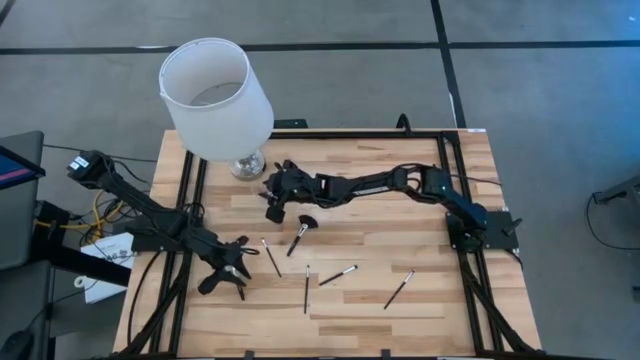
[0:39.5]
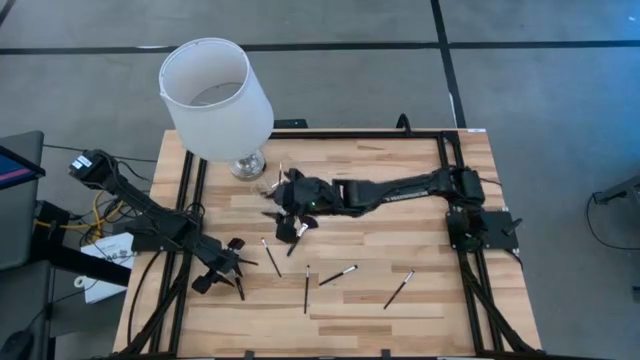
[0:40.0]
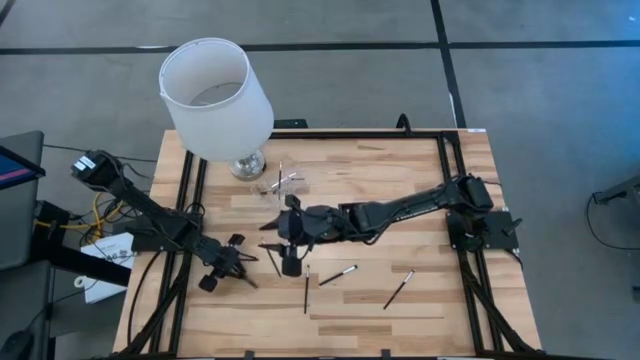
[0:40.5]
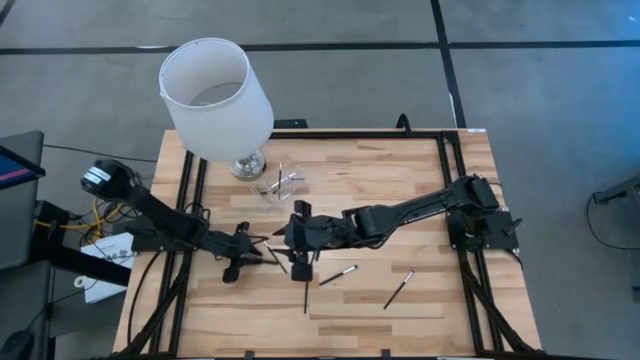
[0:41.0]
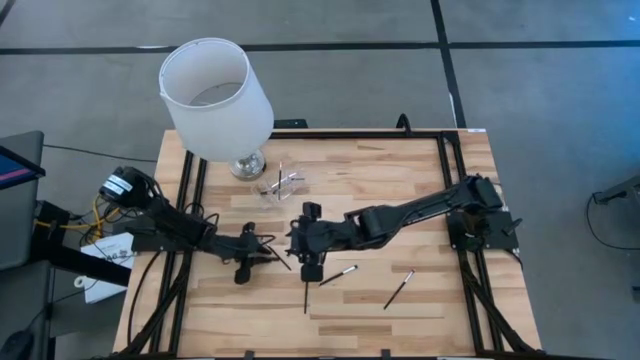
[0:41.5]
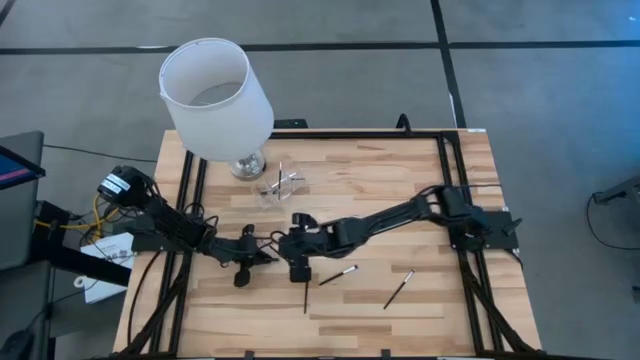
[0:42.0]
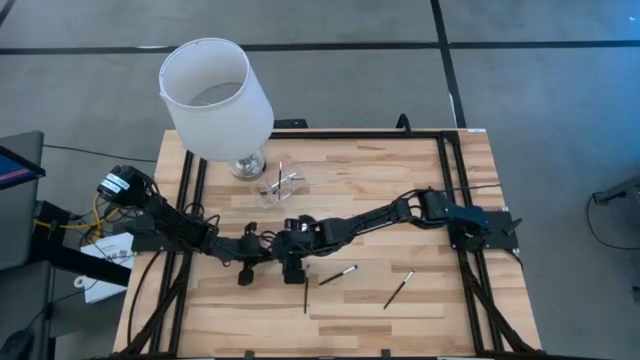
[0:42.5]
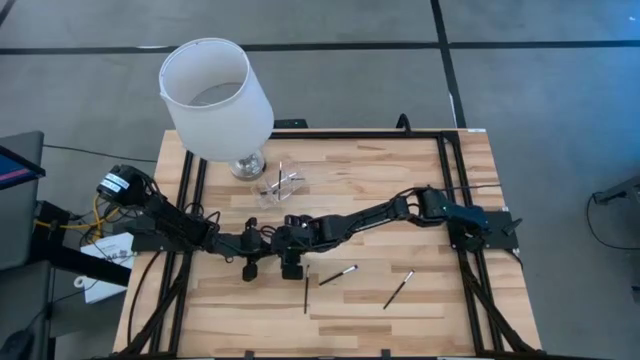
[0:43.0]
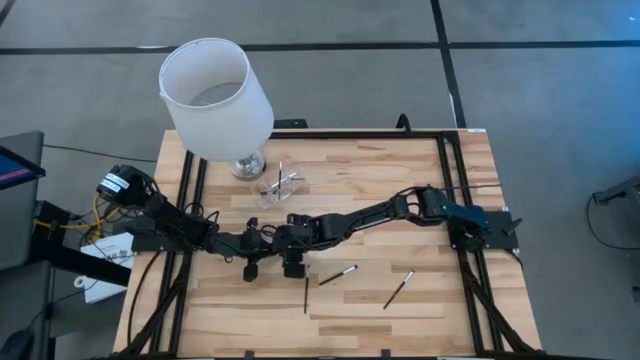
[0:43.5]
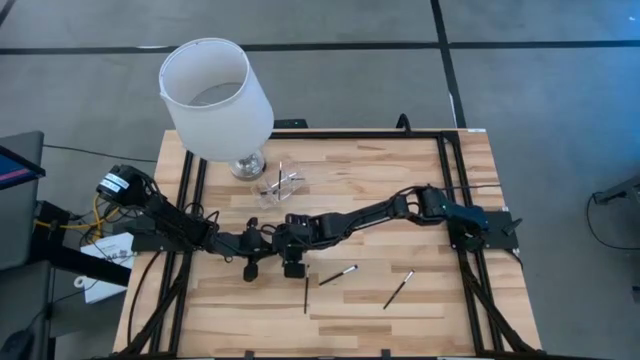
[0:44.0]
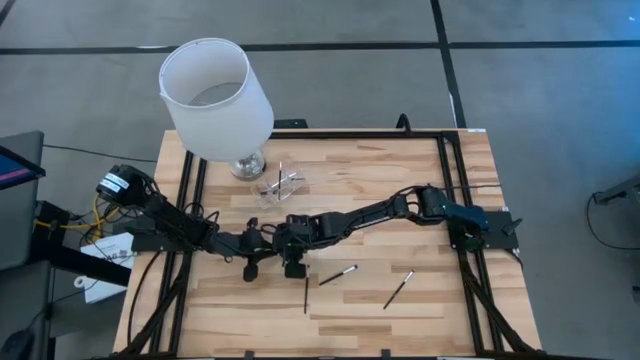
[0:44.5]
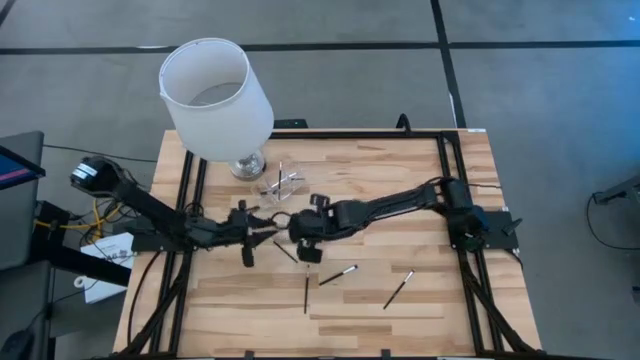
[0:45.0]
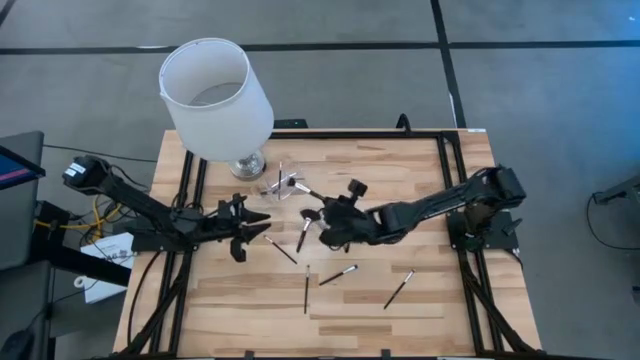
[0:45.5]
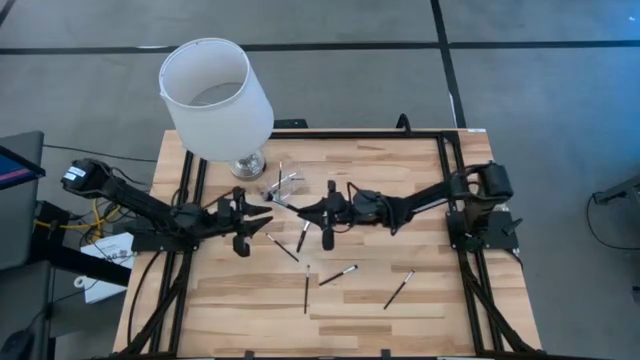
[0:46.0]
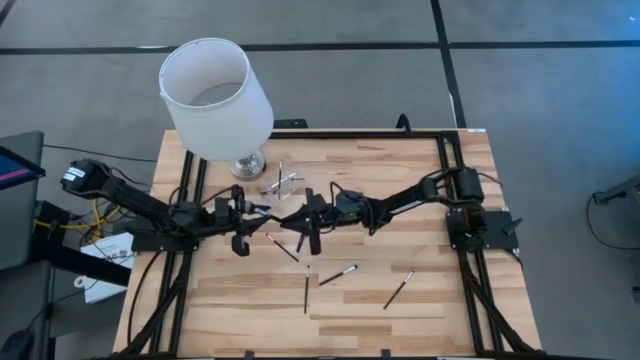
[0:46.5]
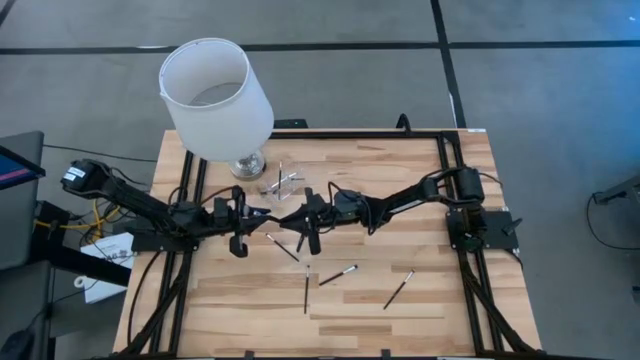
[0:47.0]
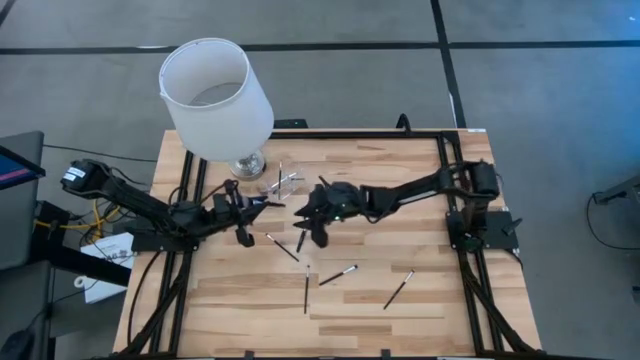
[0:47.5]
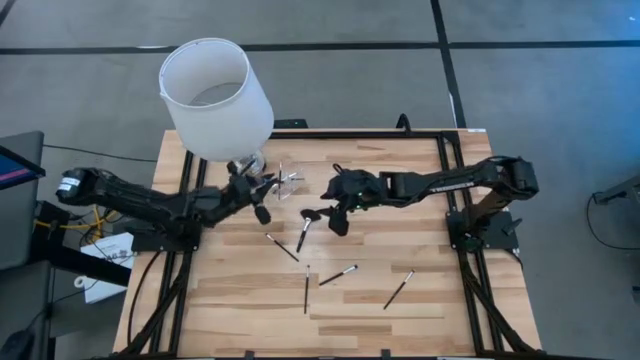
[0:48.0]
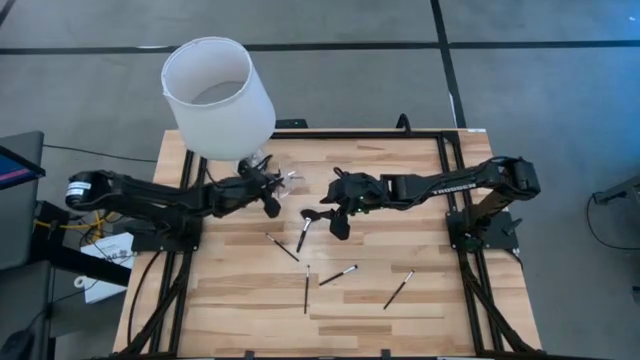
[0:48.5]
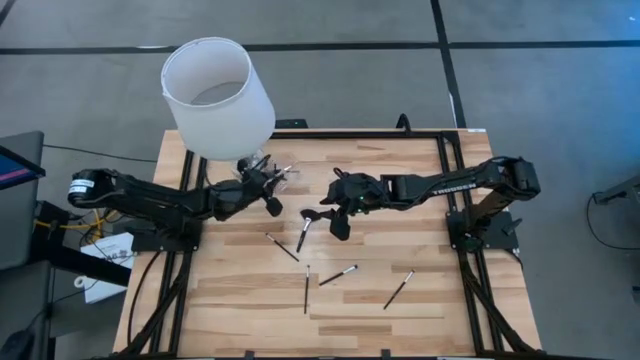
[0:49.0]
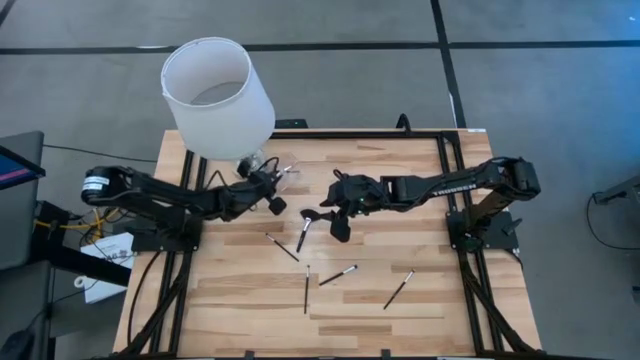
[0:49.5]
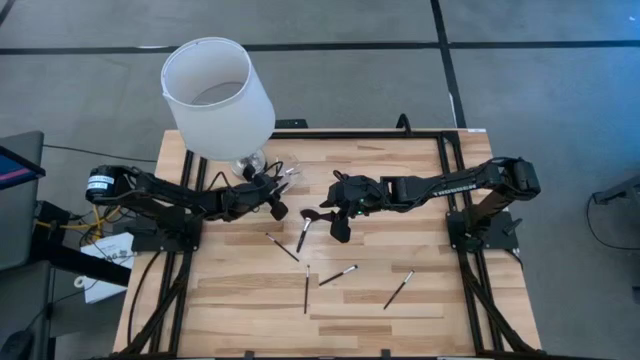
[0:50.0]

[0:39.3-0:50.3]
Task: Put items in baskets/containers
Put the black powder brush in the transparent organizer

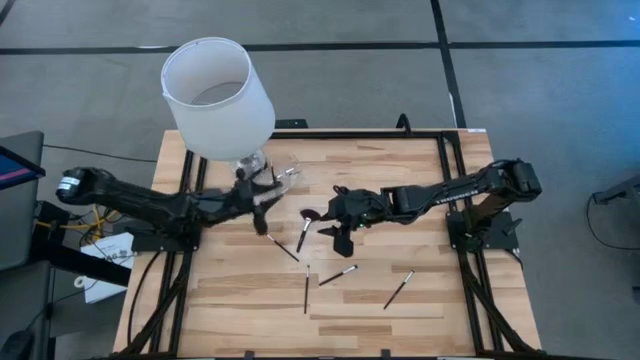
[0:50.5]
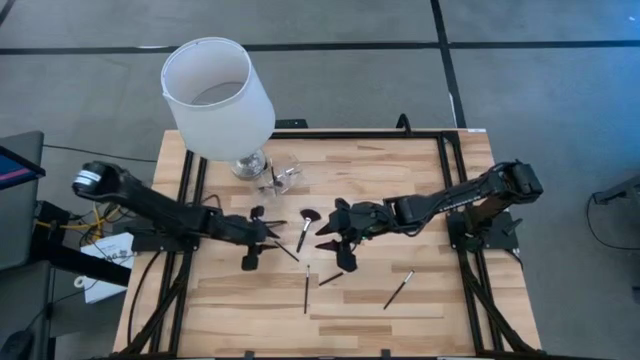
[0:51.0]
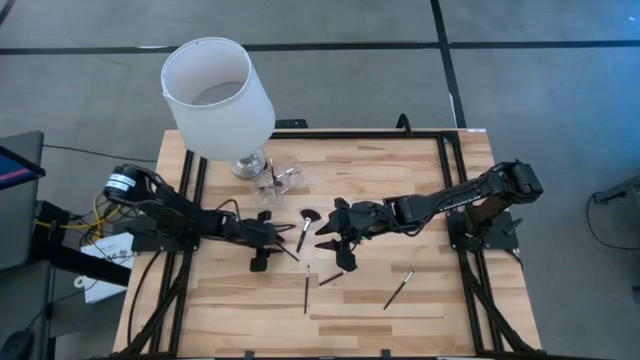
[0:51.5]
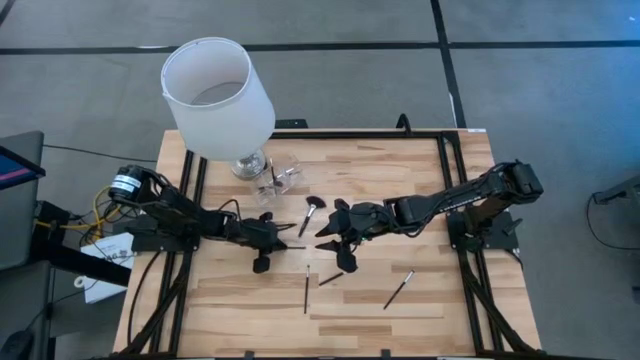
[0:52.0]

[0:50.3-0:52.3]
Put the black eyeshadow brush in the transparent organizer

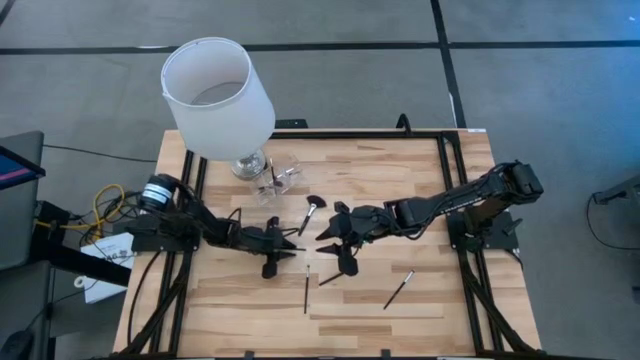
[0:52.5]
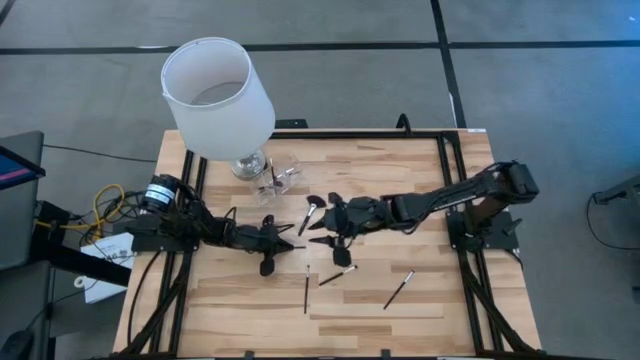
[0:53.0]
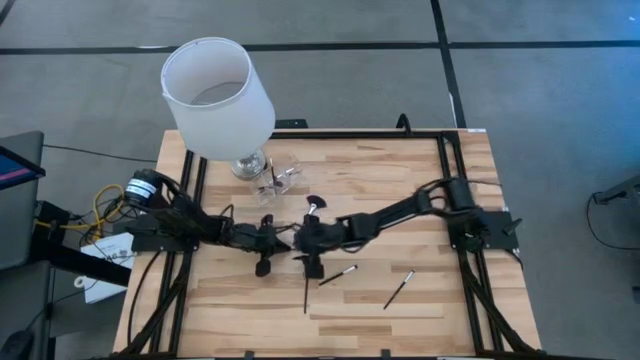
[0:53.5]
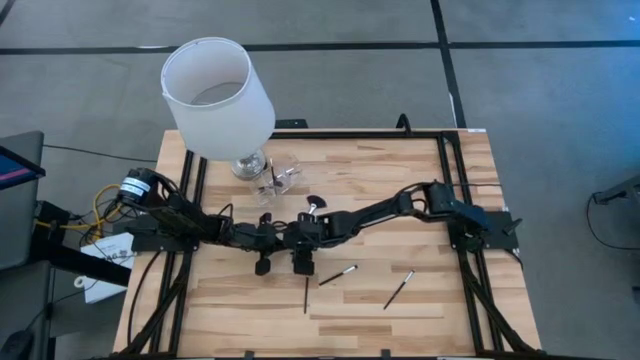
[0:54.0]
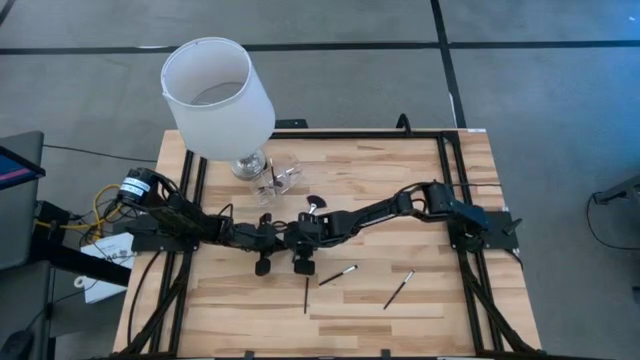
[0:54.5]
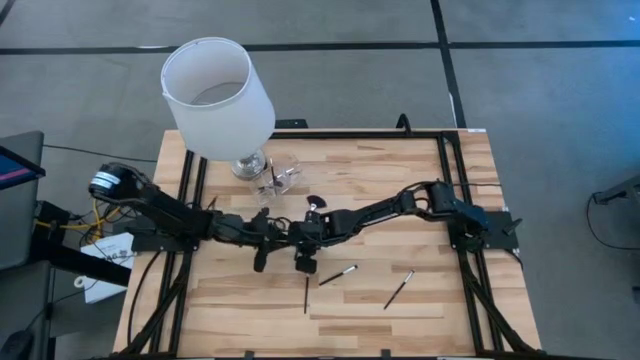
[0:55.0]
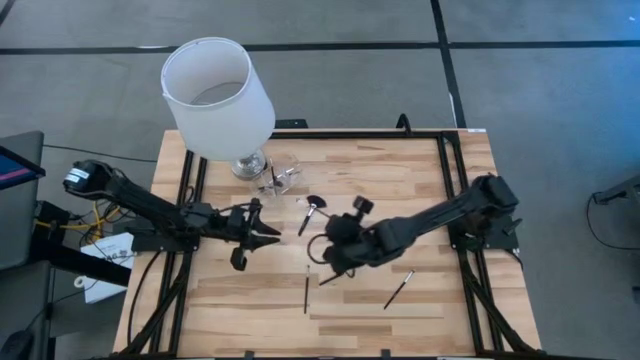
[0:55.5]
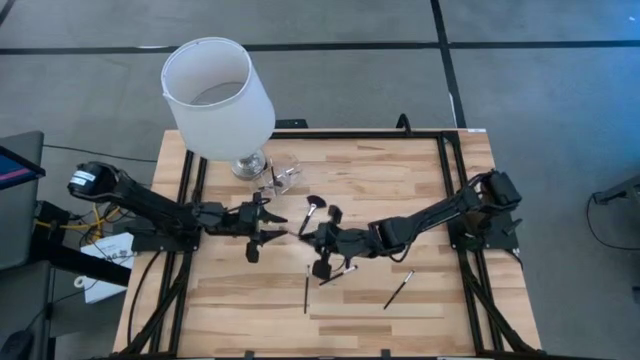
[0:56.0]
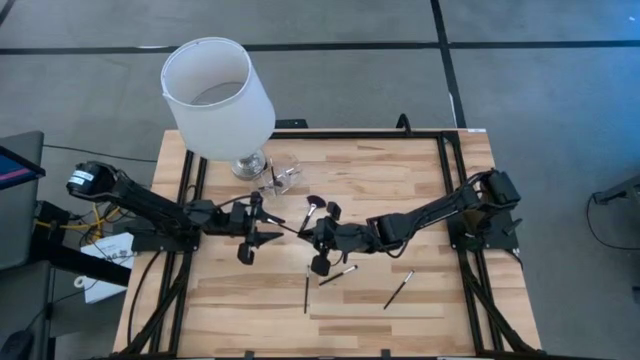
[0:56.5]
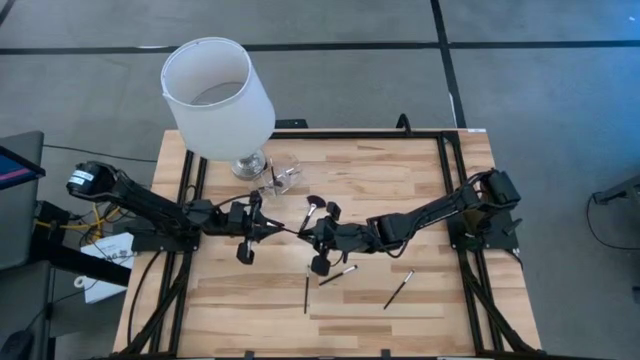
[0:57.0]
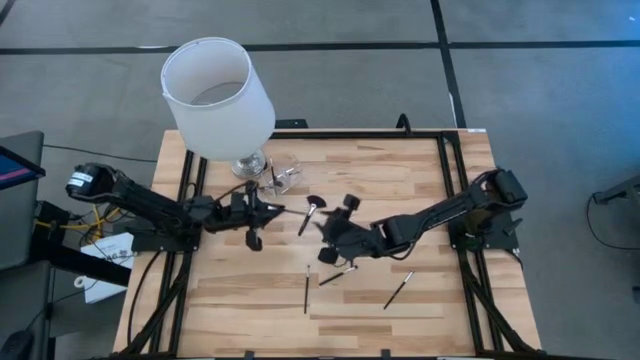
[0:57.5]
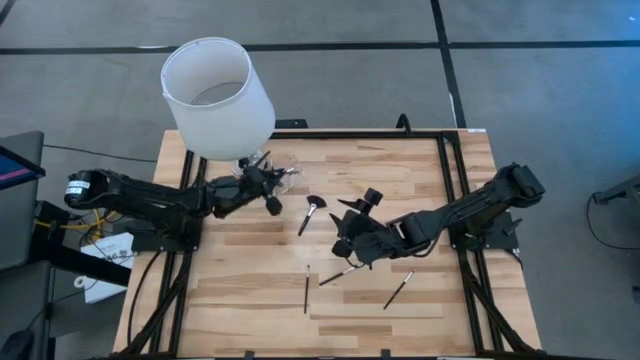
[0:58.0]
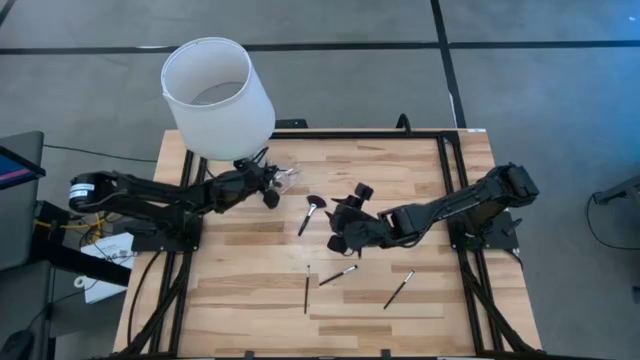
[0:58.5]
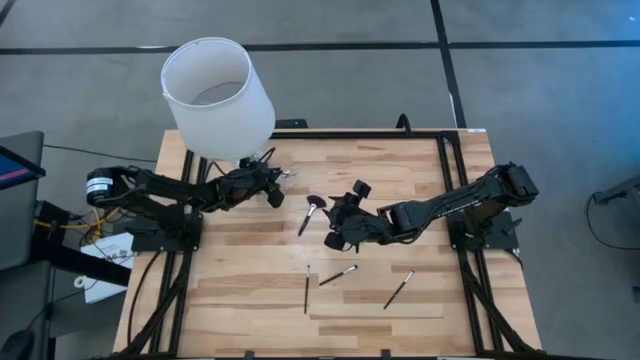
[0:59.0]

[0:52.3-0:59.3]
Put the black eyeshadow brush in the transparent organizer

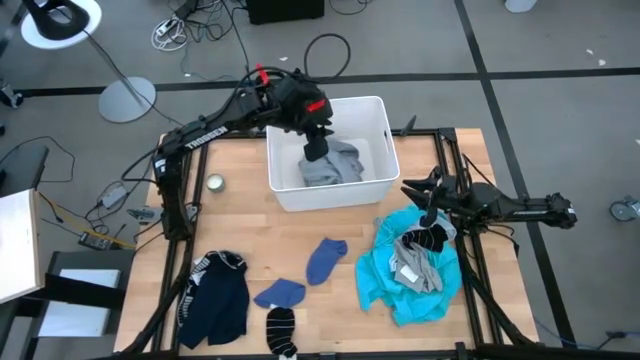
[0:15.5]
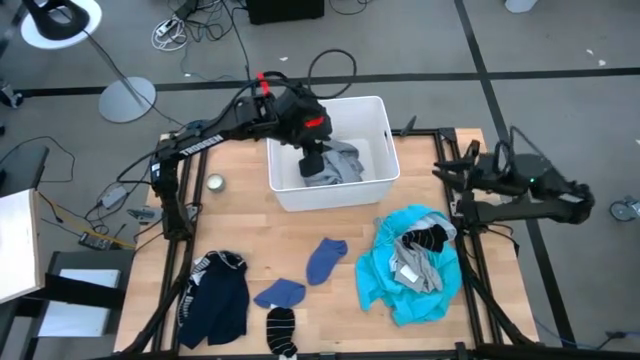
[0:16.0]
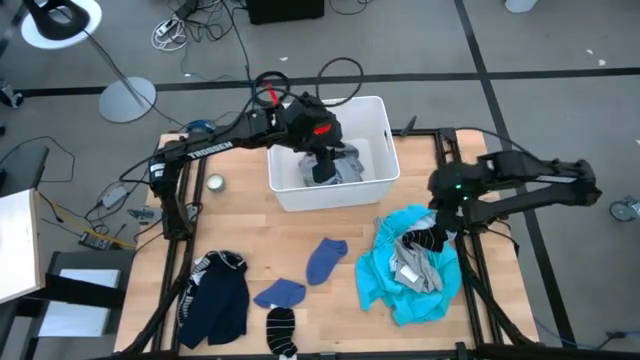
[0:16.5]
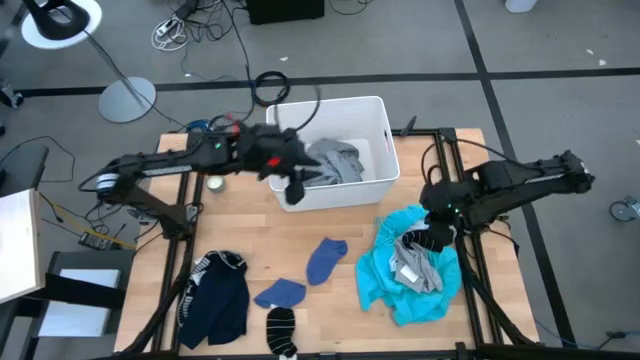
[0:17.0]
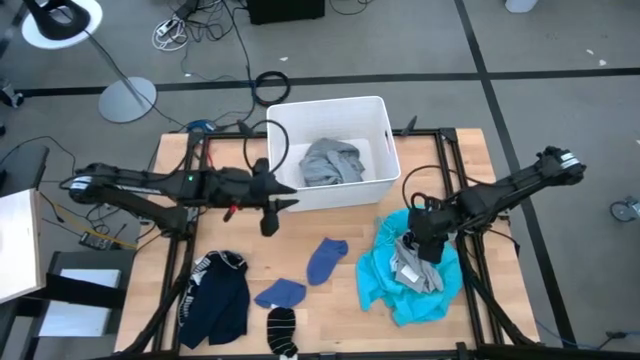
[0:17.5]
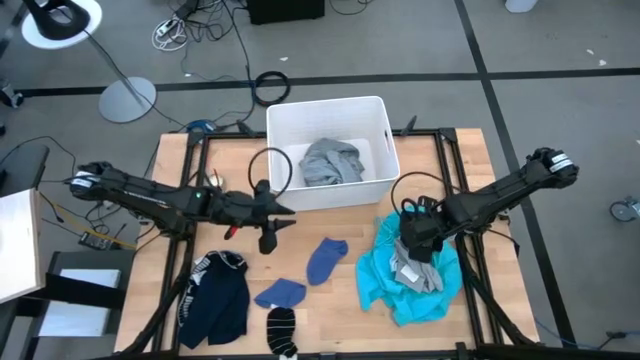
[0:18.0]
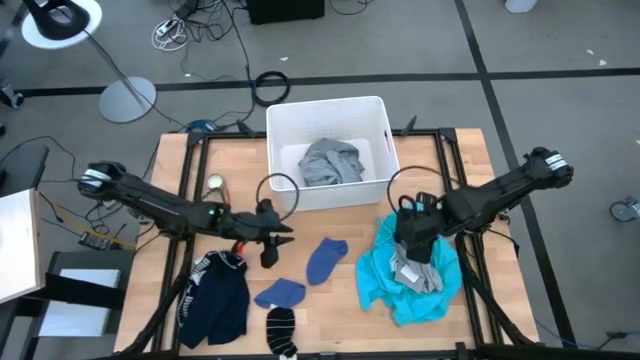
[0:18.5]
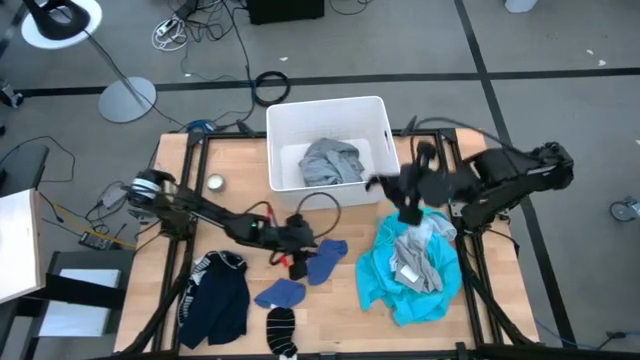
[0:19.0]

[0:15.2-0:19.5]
Task: Sort clothes
Put the black sock into the white laundry organizer
